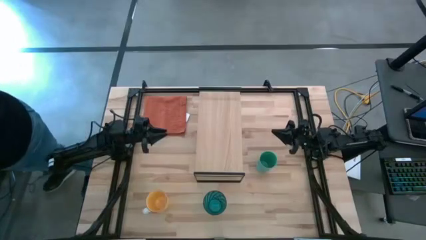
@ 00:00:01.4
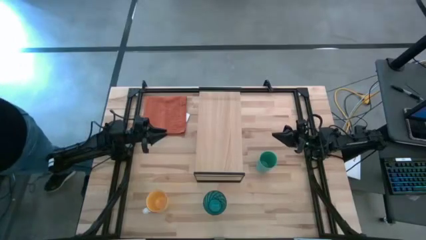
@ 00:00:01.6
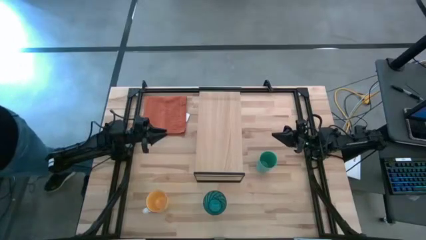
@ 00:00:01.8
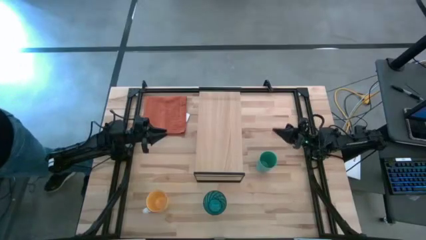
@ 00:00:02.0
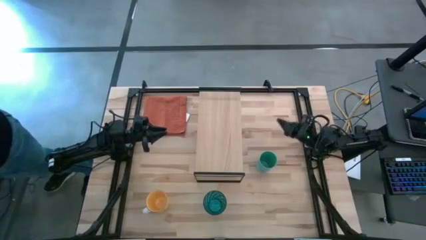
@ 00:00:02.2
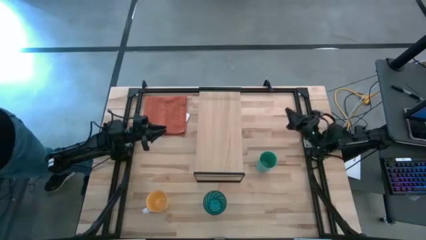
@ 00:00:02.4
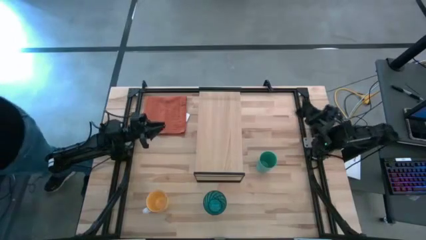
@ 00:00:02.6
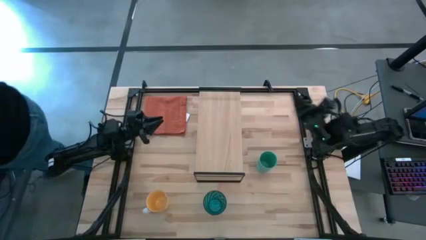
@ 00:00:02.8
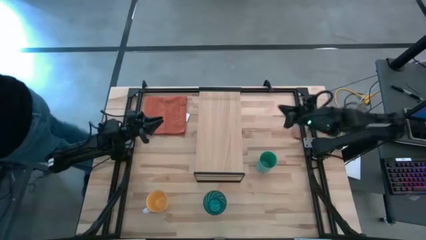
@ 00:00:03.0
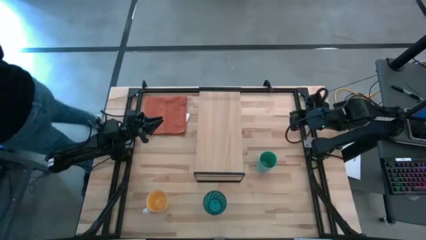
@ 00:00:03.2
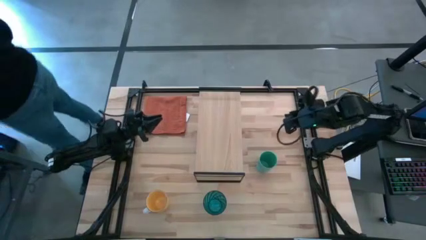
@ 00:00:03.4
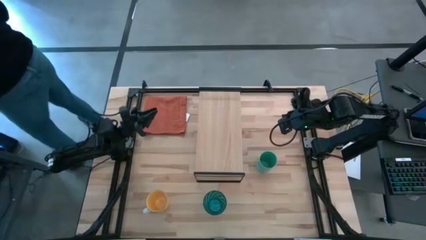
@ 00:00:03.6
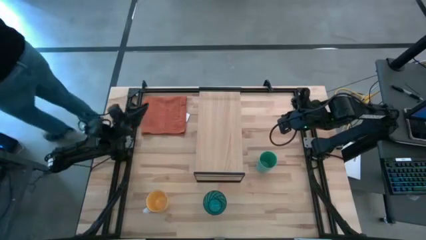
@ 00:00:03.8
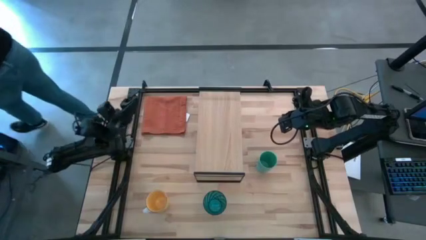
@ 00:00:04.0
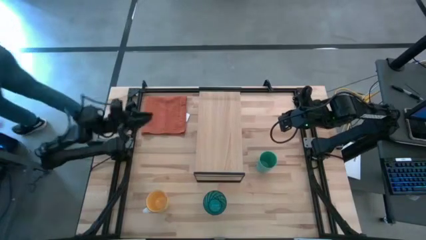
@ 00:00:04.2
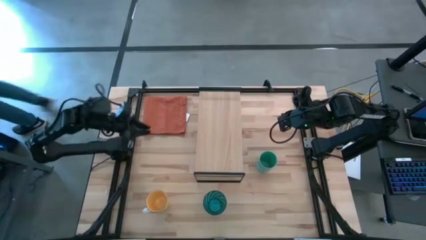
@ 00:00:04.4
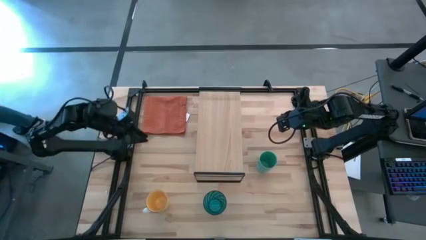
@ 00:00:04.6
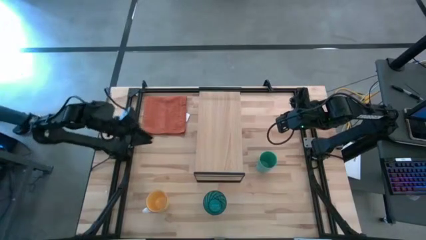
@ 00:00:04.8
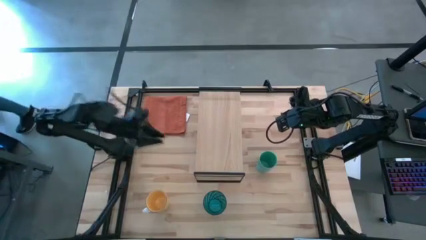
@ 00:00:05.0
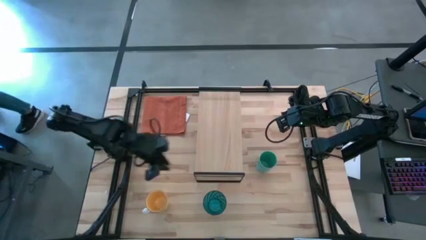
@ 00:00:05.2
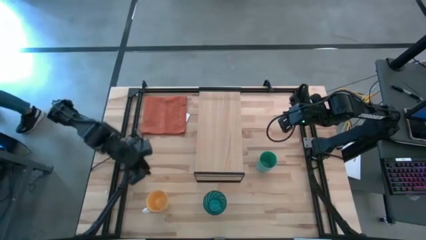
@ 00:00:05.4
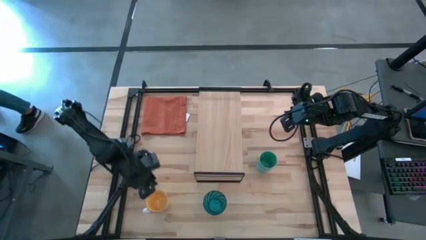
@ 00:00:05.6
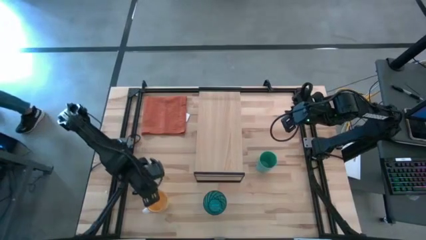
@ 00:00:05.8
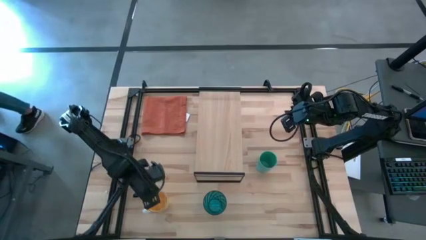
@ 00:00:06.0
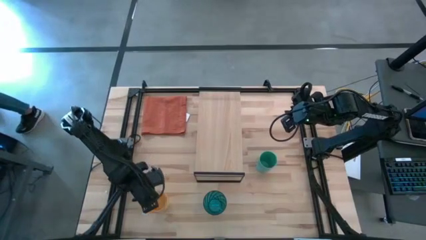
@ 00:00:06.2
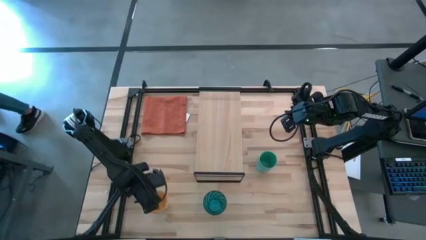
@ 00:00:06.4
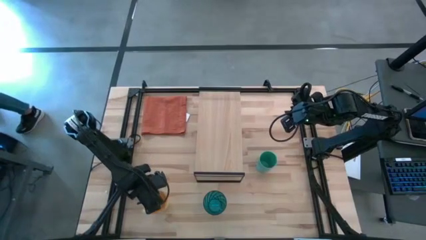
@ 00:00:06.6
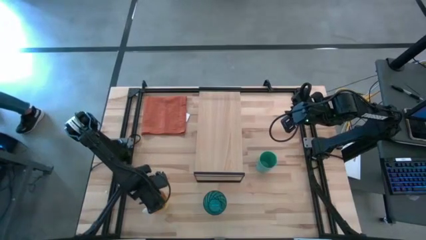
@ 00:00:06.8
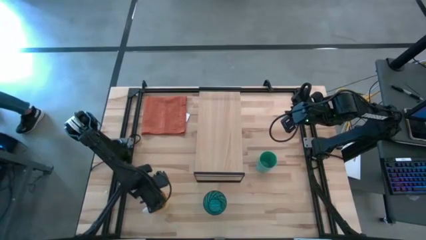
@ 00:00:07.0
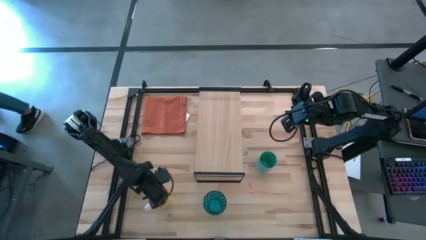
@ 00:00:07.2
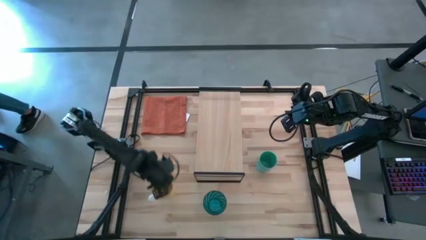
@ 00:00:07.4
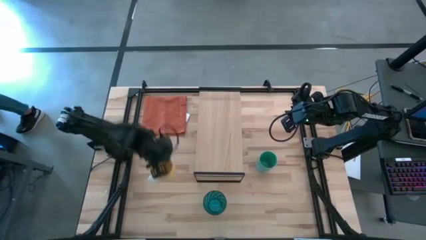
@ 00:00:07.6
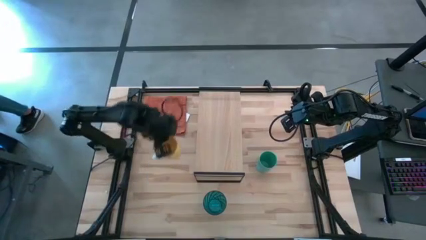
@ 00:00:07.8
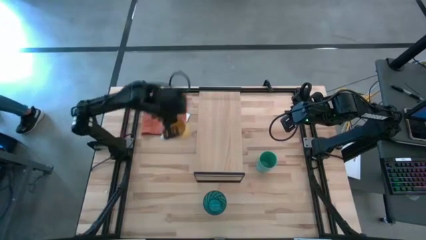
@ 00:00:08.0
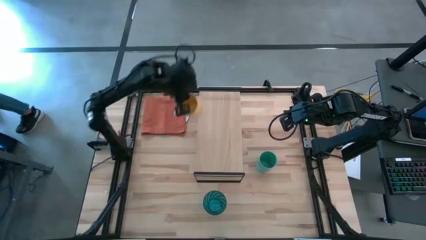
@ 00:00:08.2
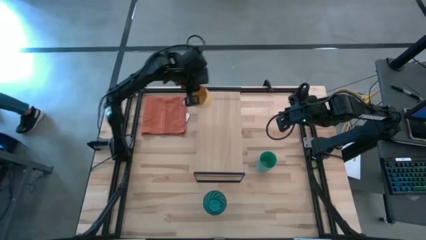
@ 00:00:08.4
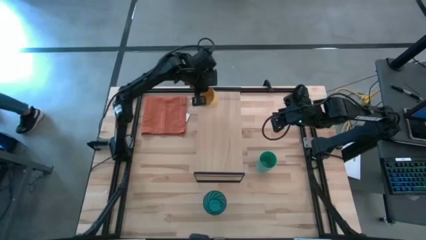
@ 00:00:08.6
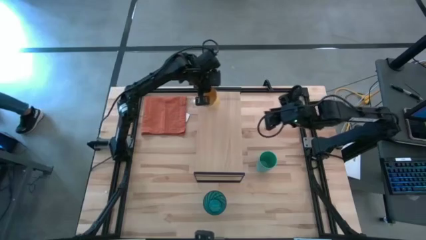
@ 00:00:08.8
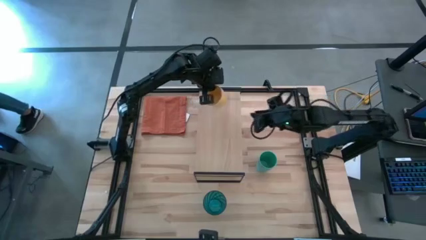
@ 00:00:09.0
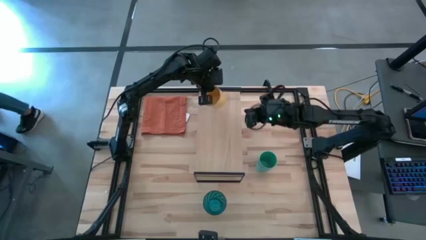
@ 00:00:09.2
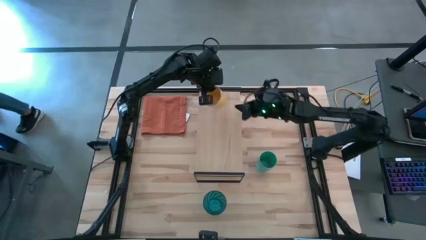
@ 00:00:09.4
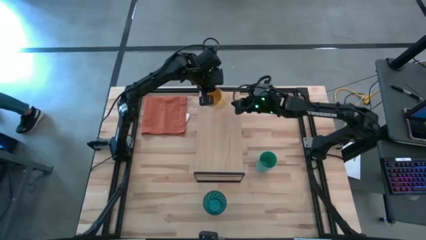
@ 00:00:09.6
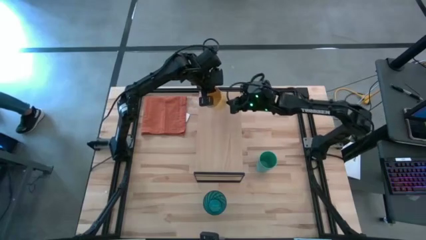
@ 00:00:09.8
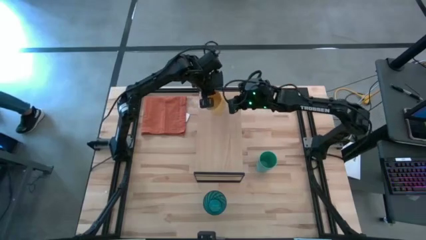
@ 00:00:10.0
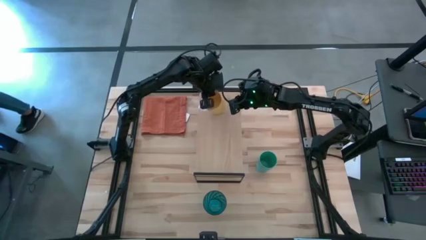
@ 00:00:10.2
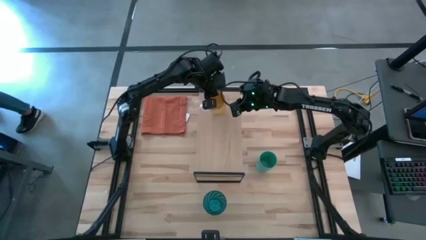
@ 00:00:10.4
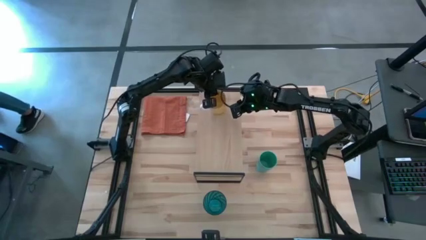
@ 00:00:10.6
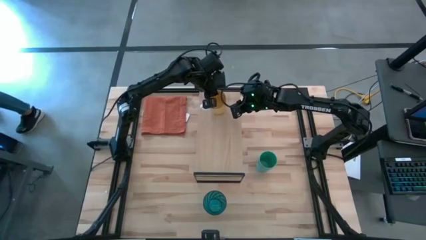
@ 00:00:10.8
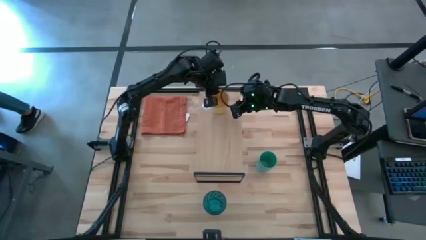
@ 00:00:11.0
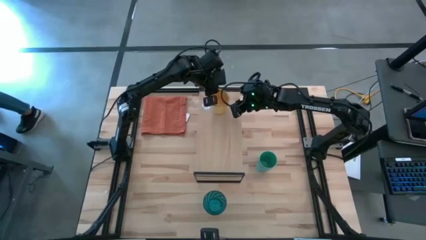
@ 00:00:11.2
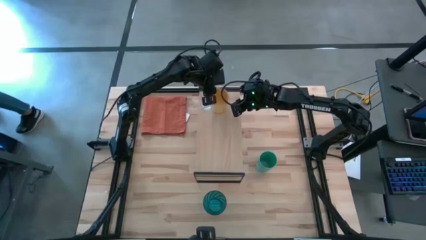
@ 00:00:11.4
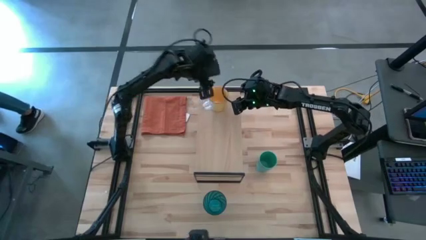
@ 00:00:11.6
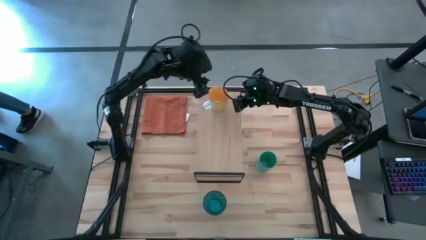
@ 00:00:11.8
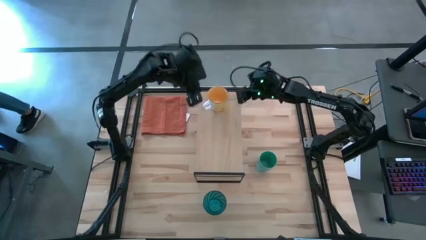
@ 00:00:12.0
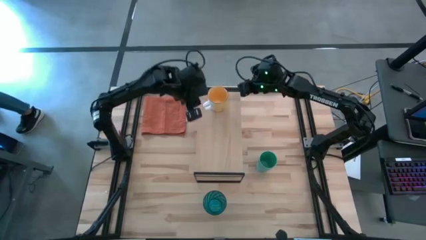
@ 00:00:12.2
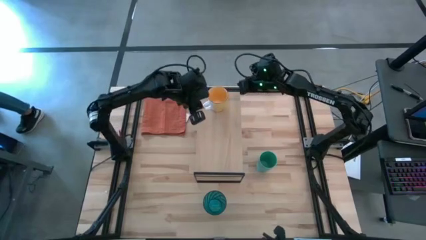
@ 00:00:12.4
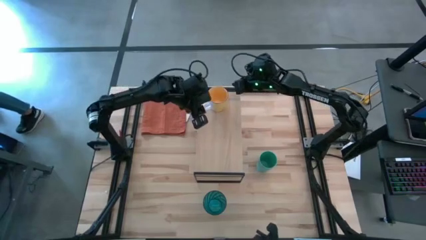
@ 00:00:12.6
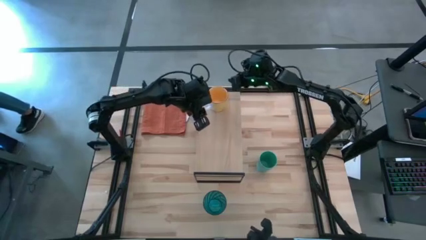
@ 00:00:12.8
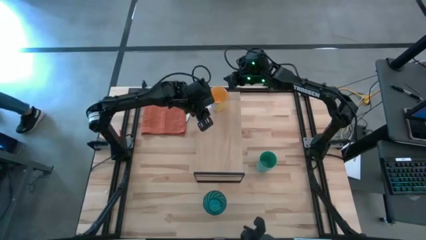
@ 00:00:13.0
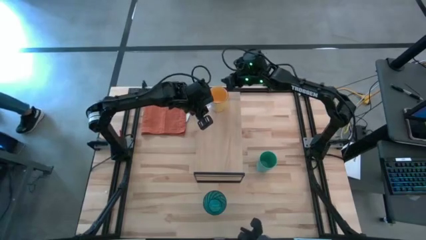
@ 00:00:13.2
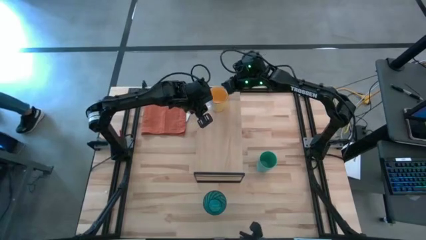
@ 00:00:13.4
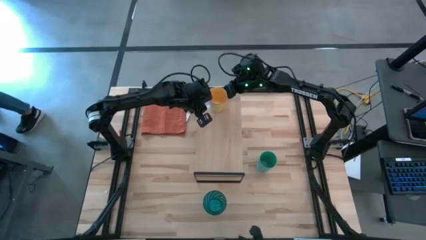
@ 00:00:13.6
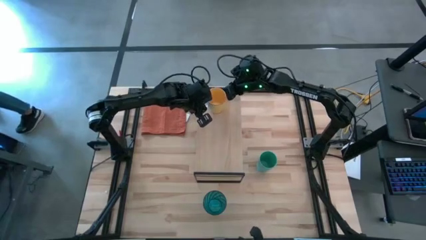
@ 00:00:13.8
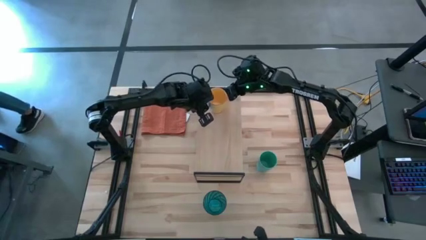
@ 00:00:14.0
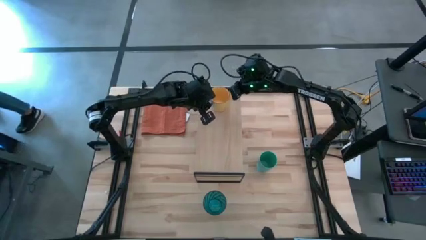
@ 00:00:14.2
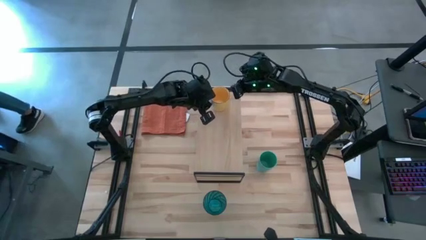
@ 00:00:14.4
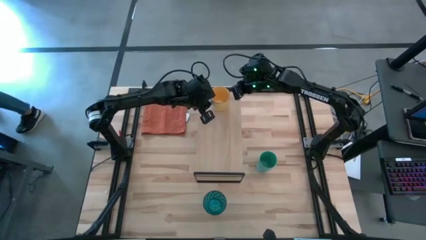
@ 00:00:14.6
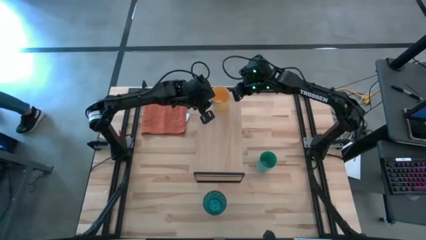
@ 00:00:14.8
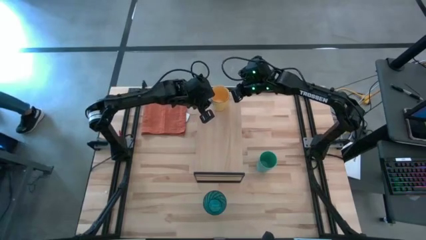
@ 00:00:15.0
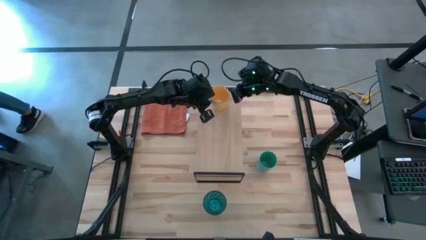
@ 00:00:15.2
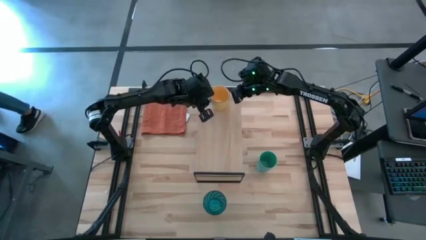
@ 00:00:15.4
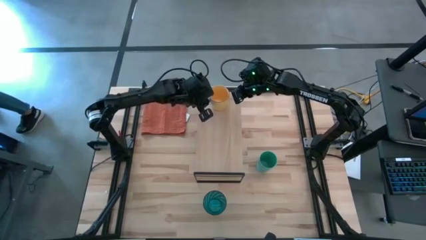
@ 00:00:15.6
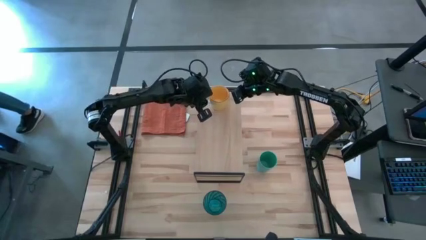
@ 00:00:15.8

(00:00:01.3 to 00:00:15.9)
Task: Stack small to large cups/mugs on shelf
Put the yellow mug on the shelf
